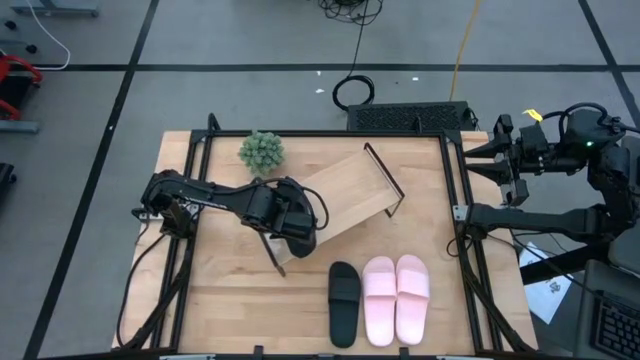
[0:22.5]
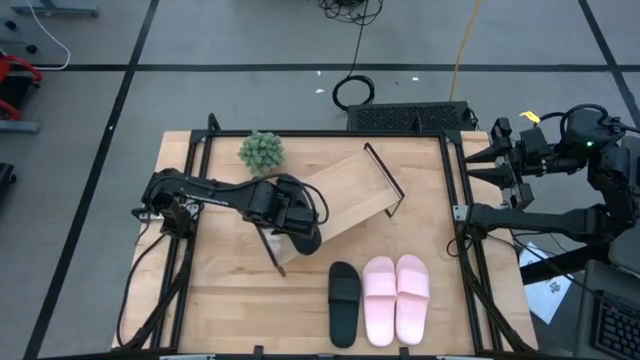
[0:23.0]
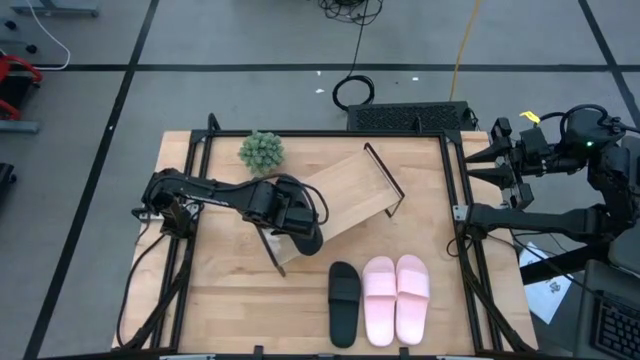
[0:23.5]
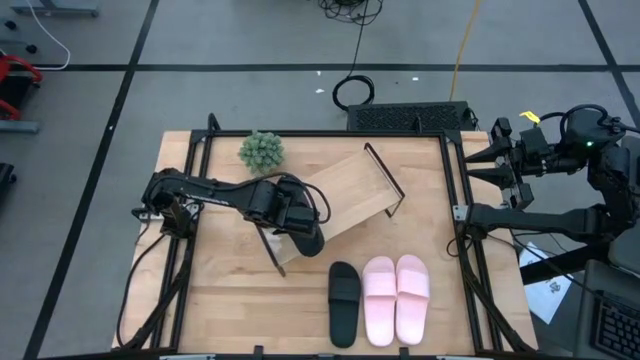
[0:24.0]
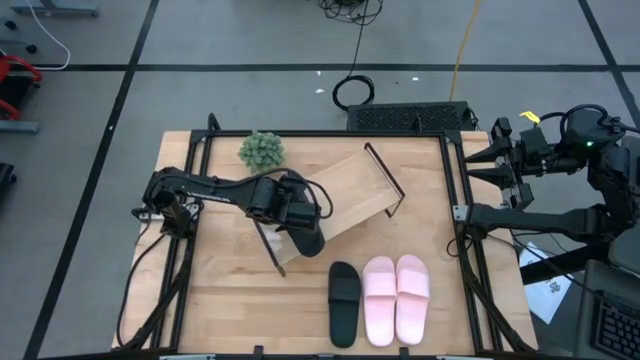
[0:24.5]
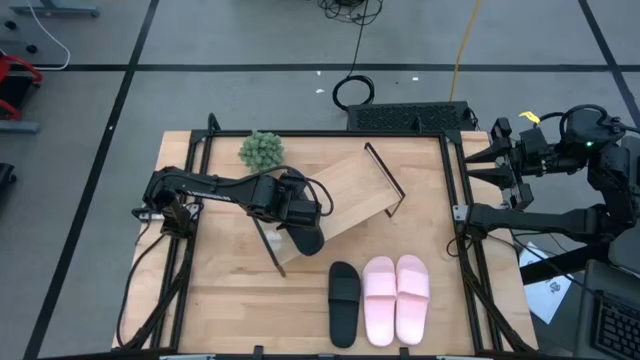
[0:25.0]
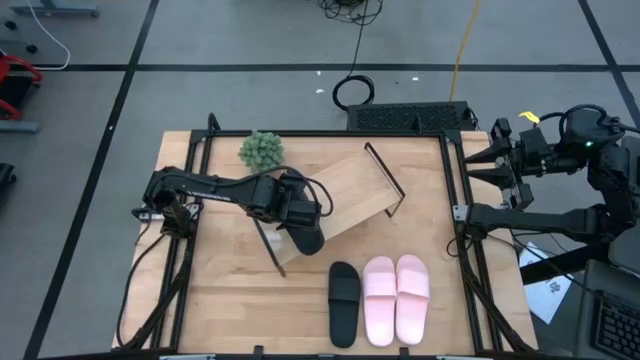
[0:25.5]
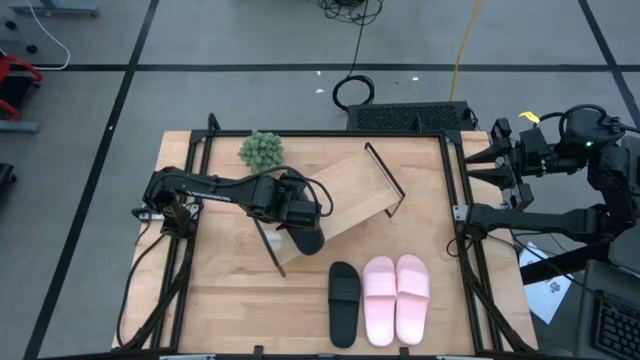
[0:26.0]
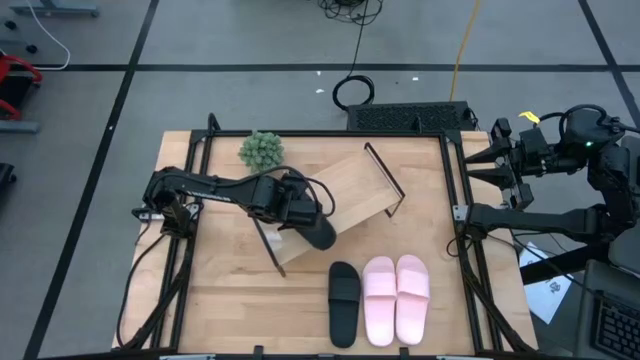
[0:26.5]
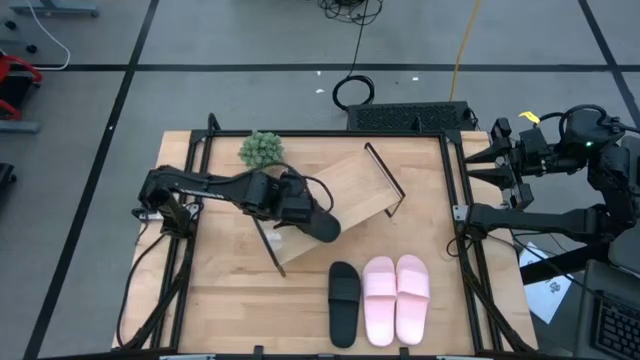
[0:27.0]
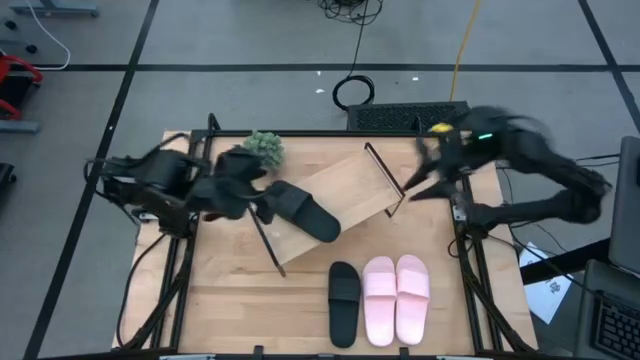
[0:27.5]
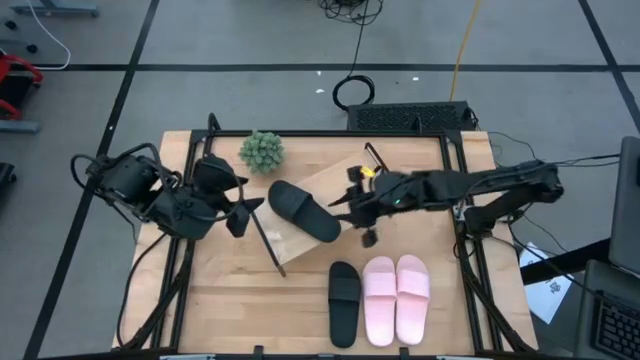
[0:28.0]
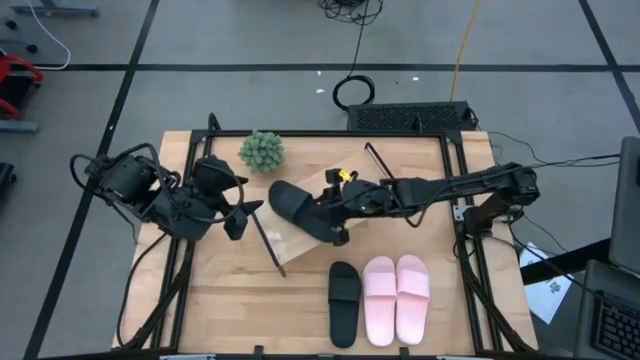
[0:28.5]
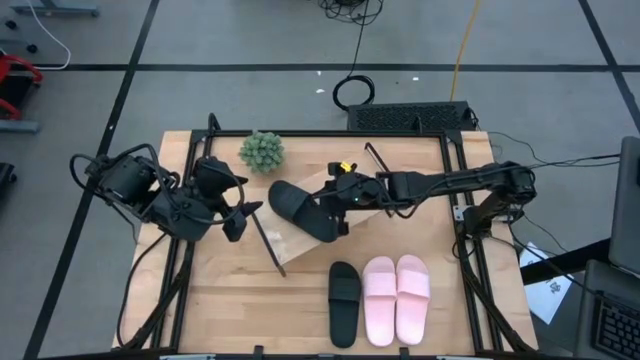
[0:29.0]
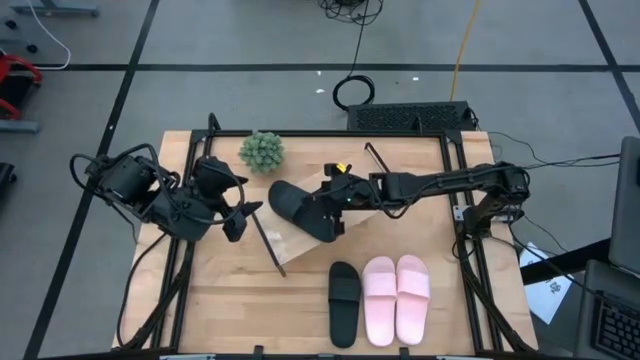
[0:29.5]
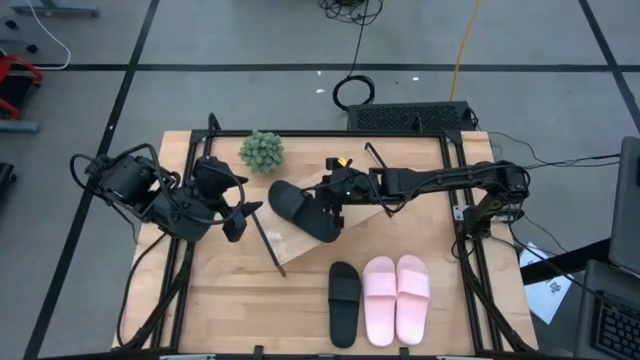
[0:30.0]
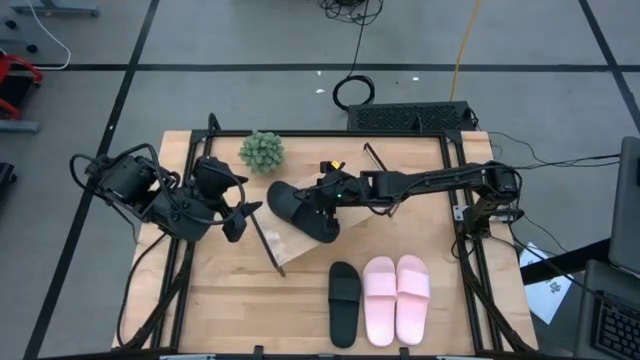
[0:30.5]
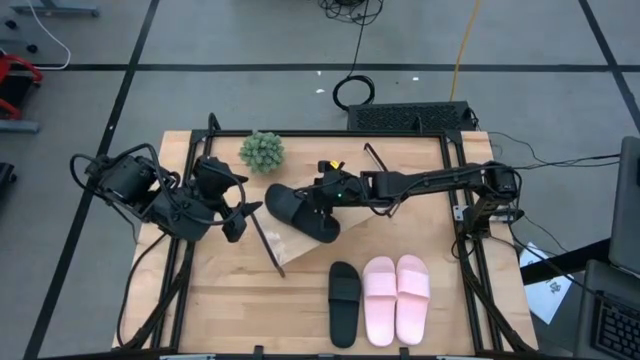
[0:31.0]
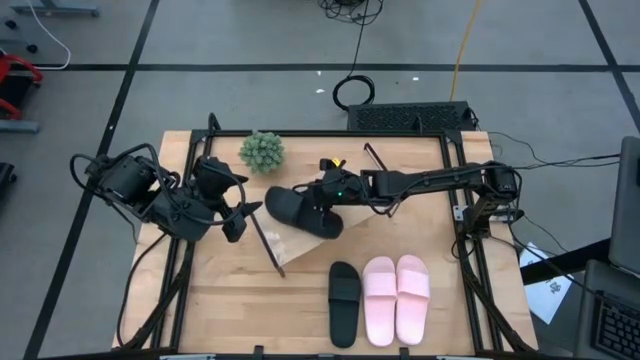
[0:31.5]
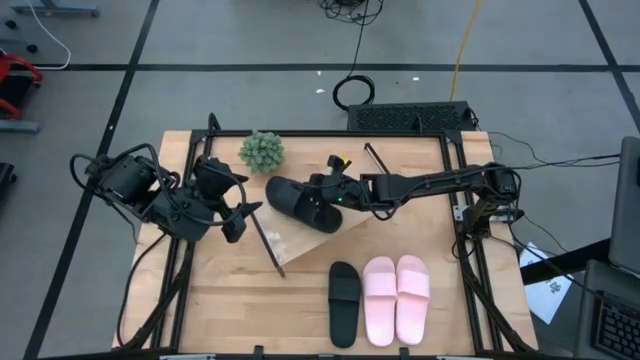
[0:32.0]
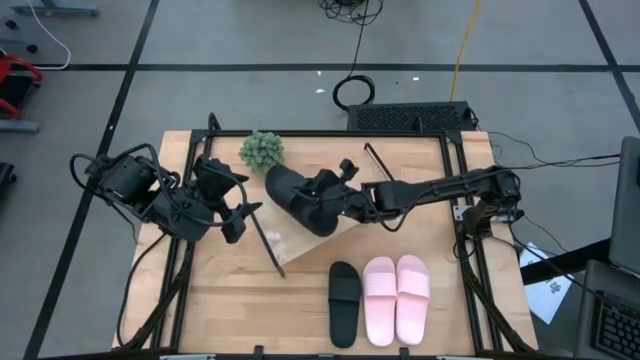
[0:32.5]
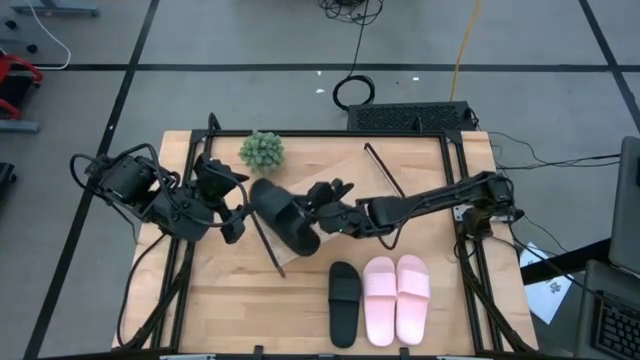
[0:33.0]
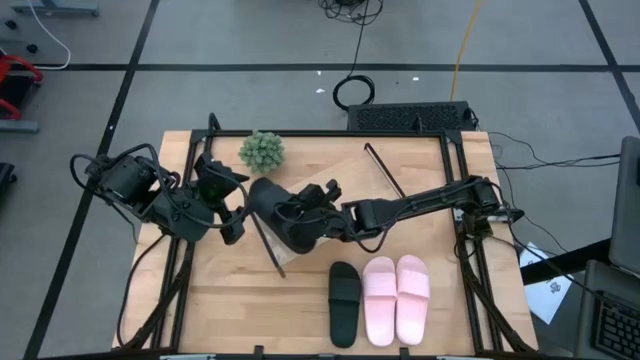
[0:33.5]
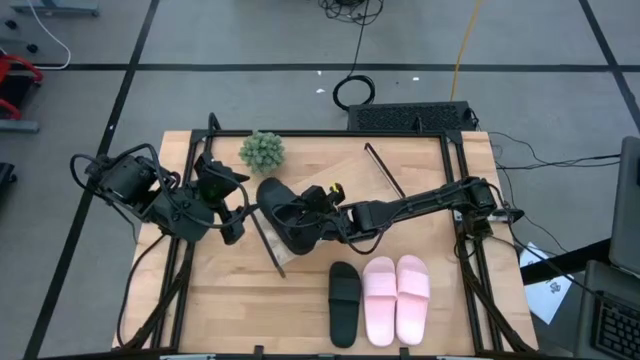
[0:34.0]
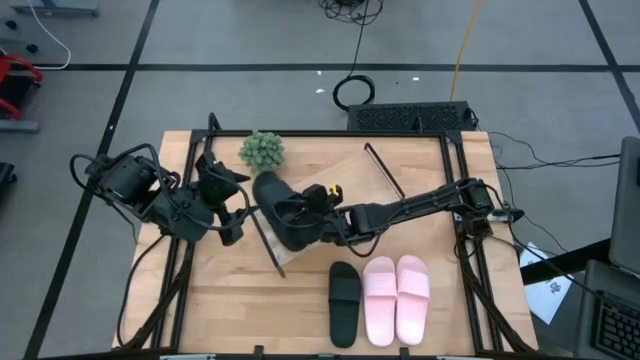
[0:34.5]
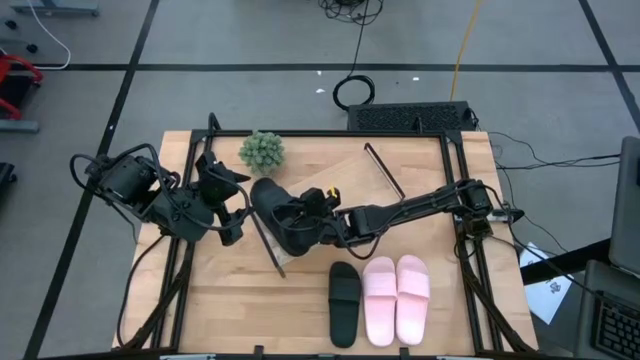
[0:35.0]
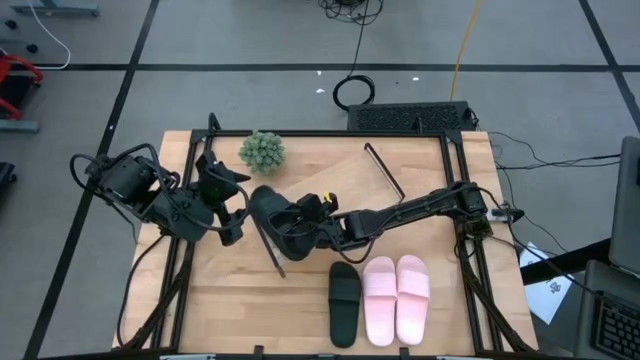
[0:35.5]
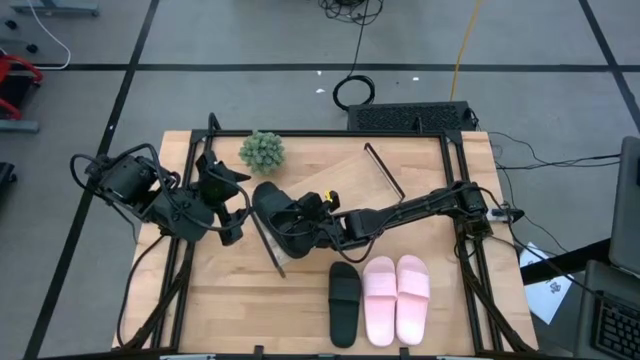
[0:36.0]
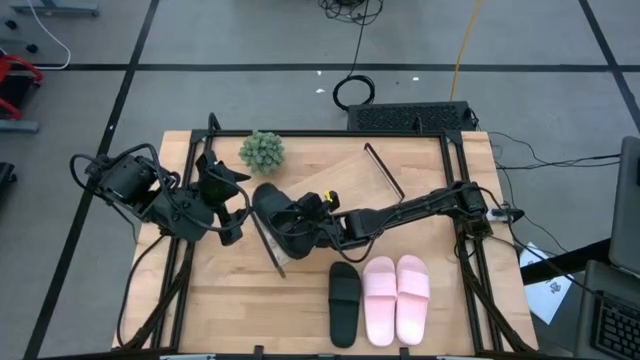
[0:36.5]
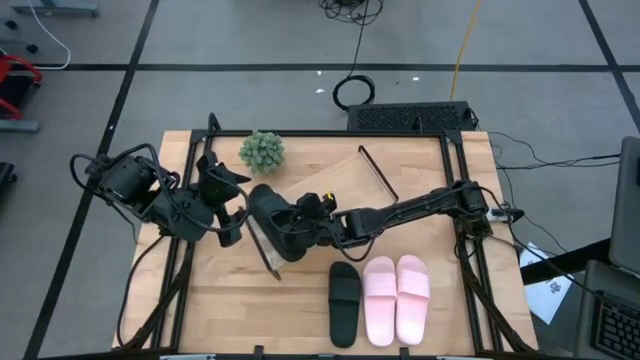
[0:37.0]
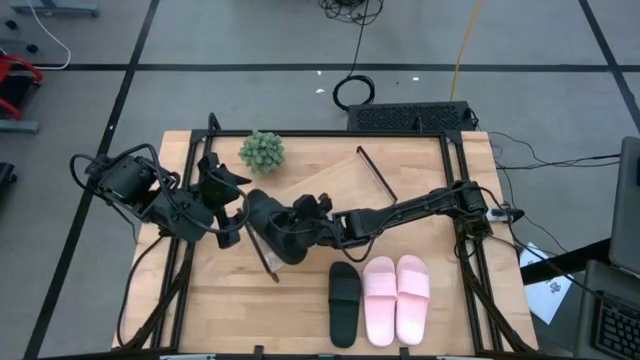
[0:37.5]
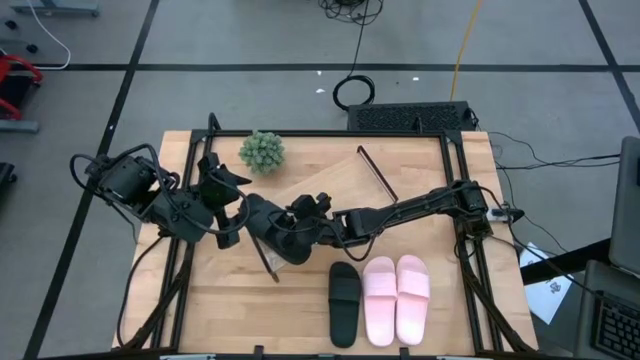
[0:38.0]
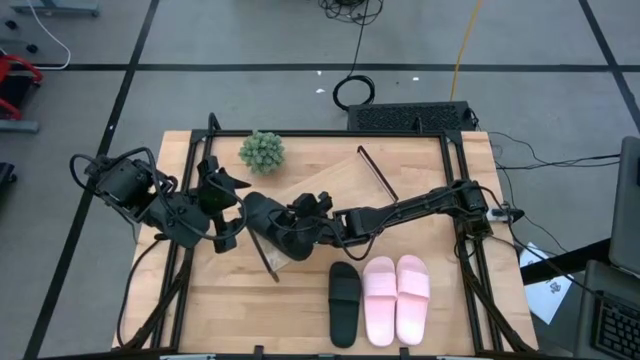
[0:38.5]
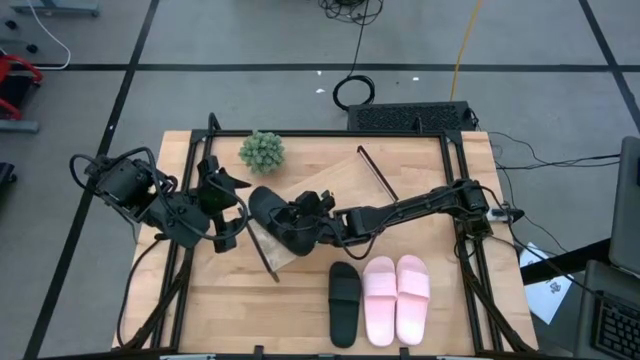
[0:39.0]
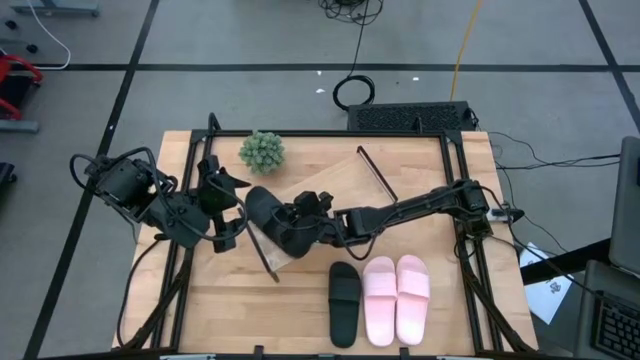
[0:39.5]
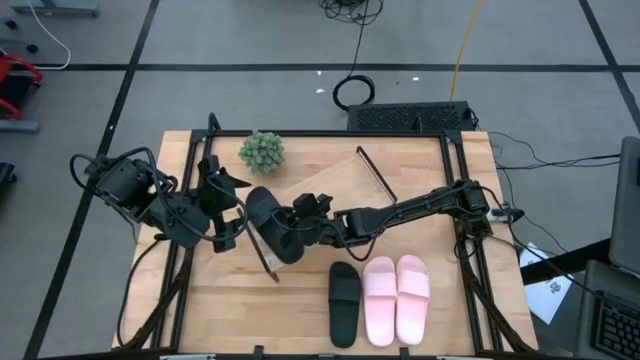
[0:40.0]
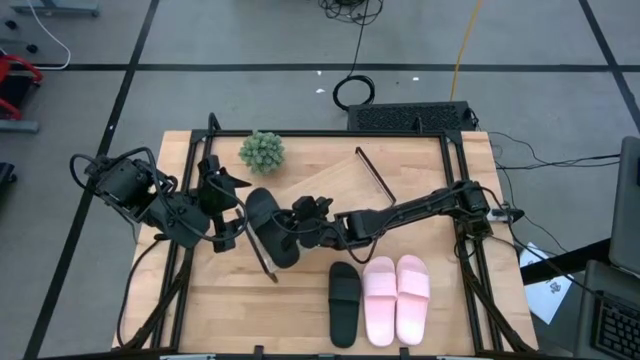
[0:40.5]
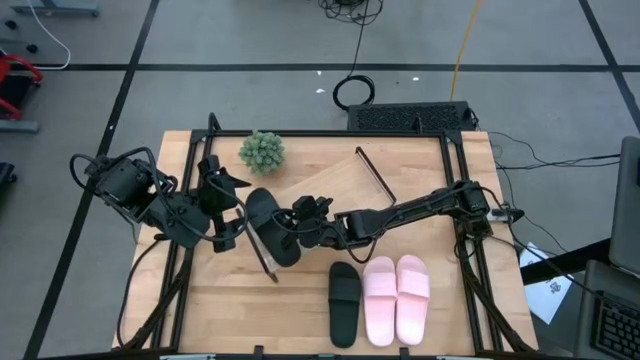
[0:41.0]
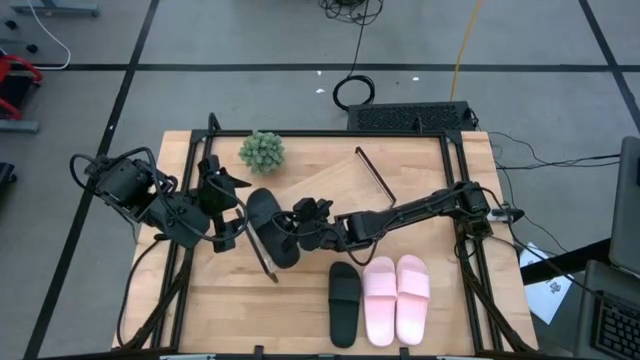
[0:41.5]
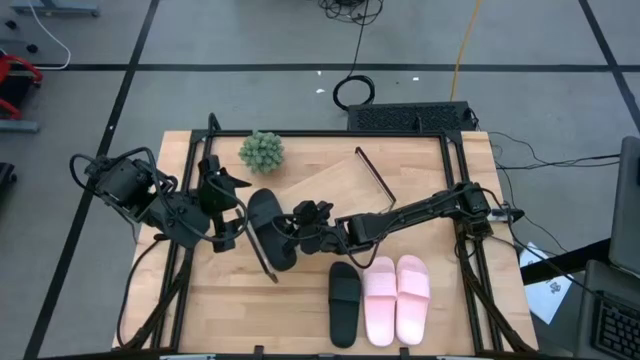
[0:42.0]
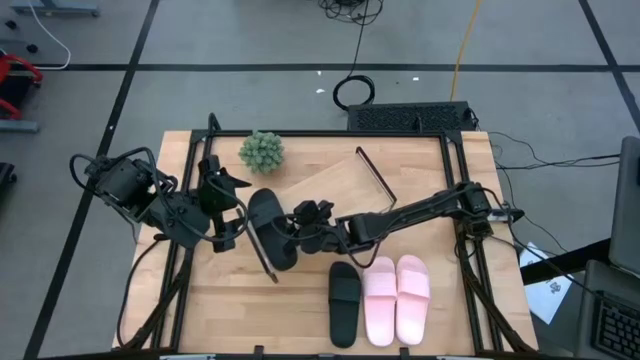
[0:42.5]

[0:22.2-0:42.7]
Task: Pick and place slides into the shelf
Put the left black slide on the shelf
